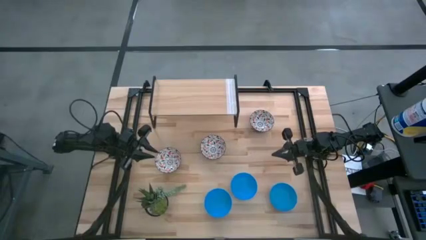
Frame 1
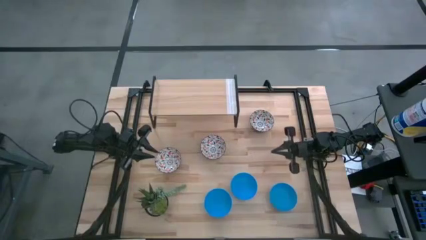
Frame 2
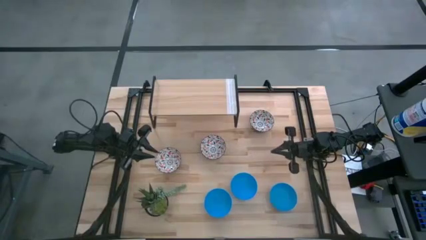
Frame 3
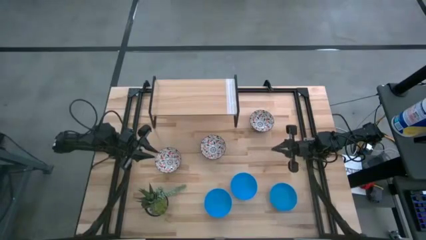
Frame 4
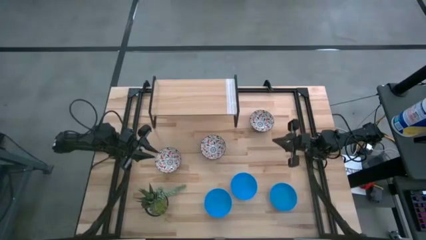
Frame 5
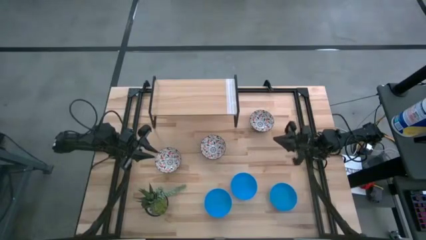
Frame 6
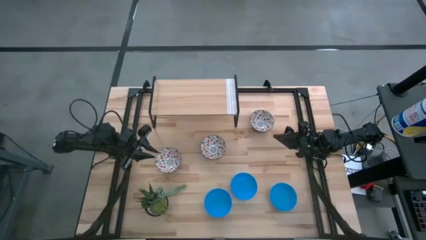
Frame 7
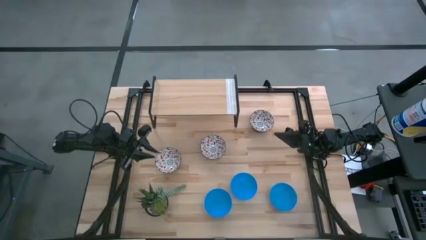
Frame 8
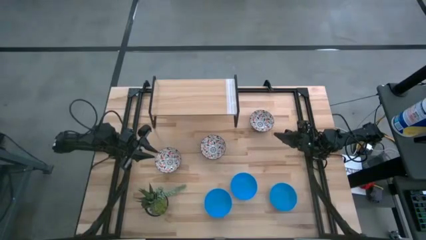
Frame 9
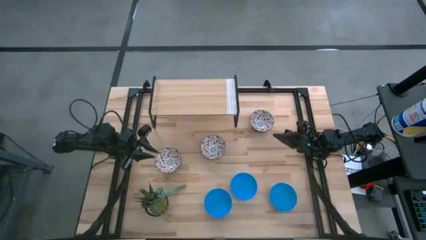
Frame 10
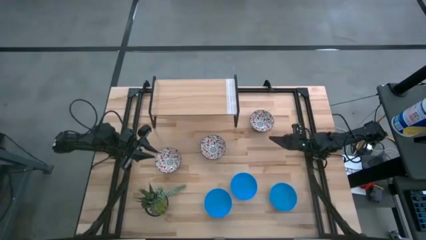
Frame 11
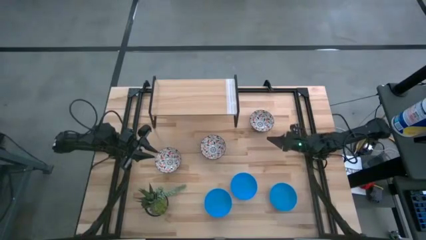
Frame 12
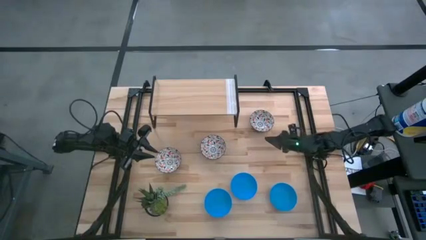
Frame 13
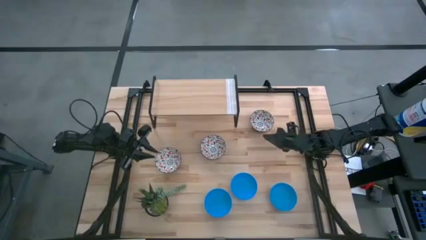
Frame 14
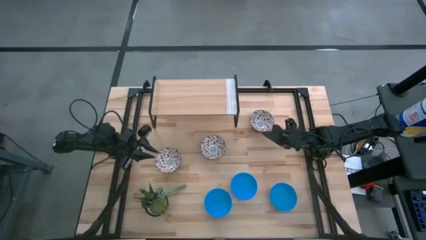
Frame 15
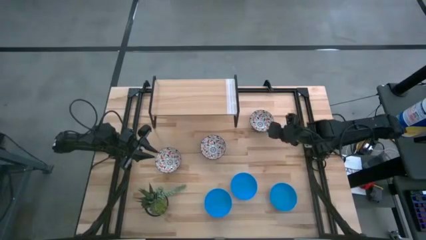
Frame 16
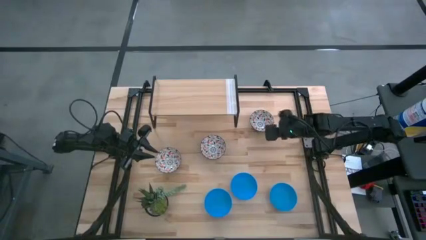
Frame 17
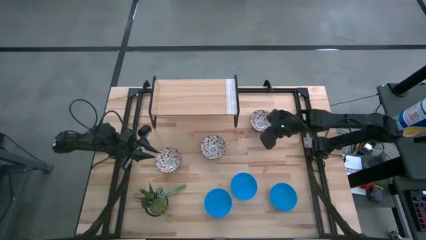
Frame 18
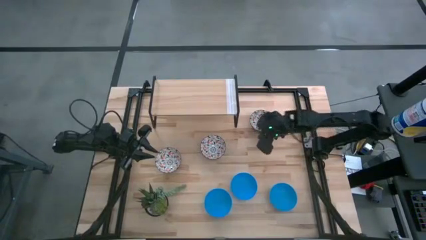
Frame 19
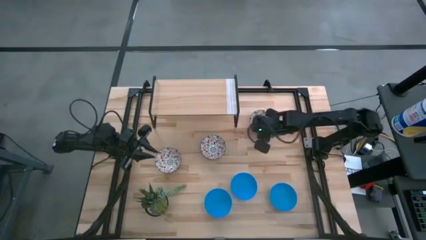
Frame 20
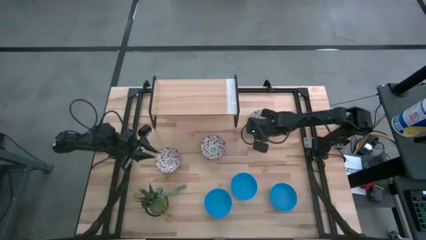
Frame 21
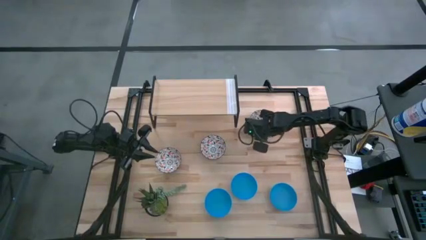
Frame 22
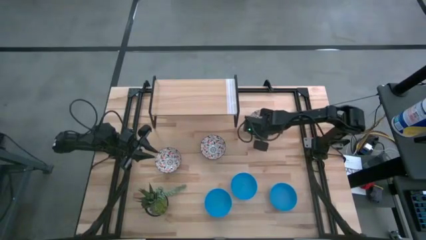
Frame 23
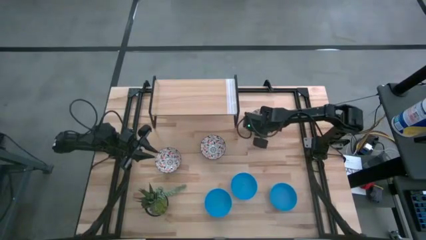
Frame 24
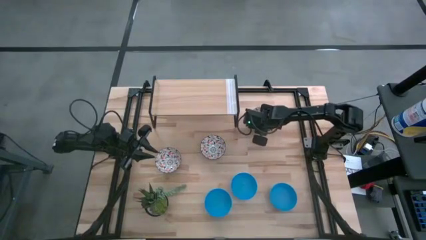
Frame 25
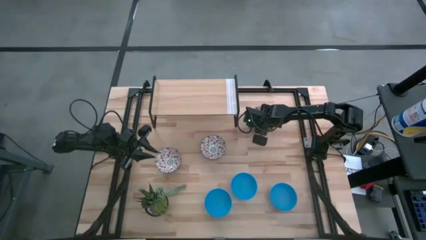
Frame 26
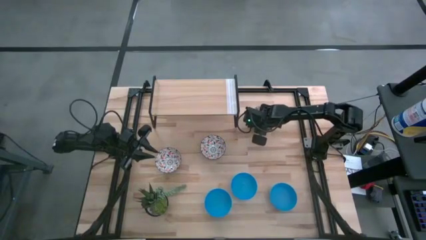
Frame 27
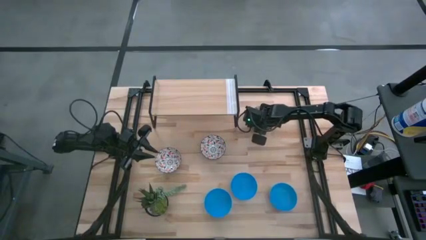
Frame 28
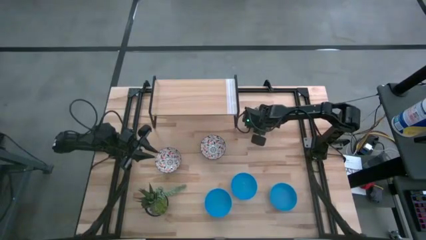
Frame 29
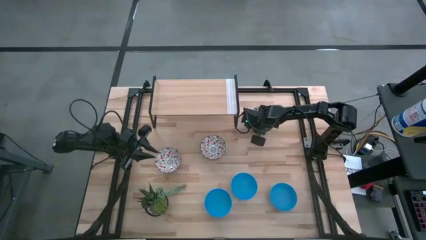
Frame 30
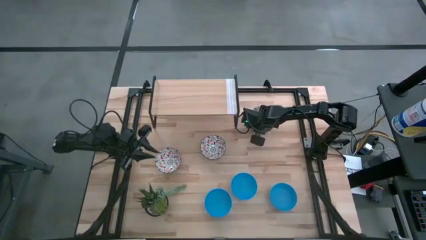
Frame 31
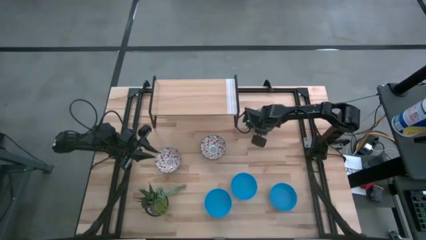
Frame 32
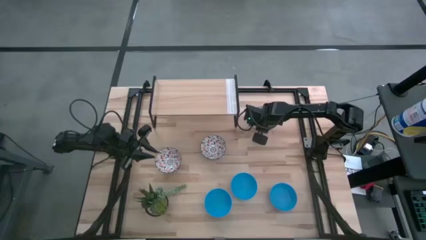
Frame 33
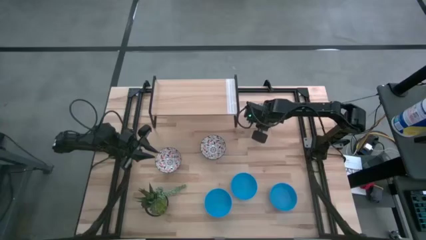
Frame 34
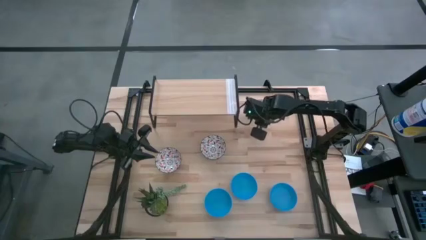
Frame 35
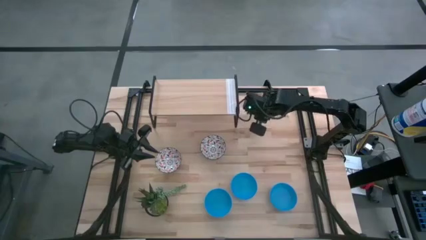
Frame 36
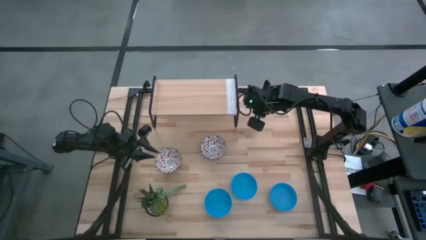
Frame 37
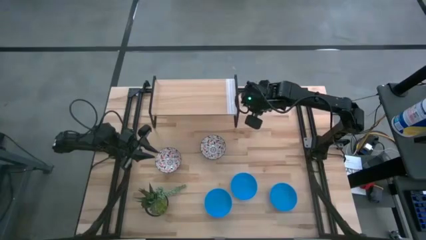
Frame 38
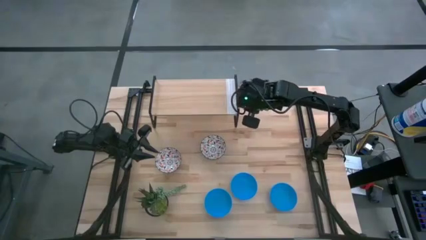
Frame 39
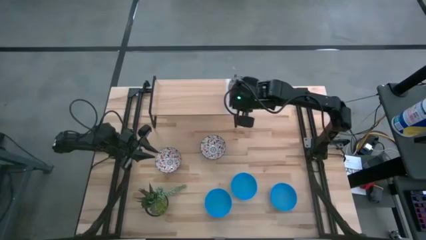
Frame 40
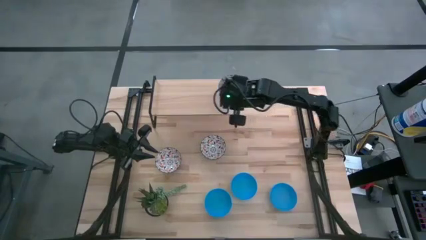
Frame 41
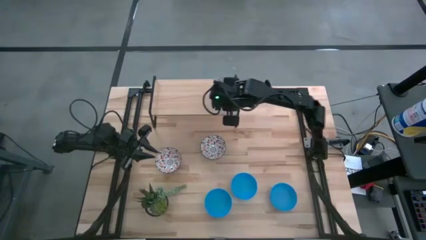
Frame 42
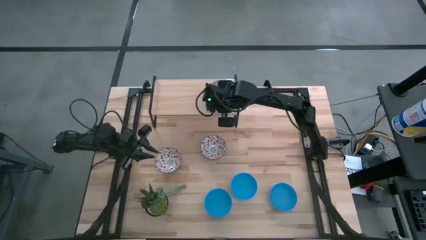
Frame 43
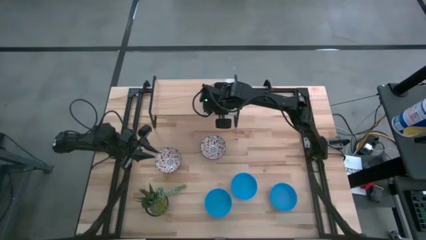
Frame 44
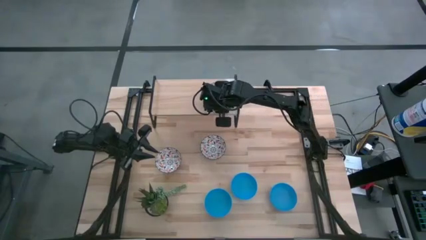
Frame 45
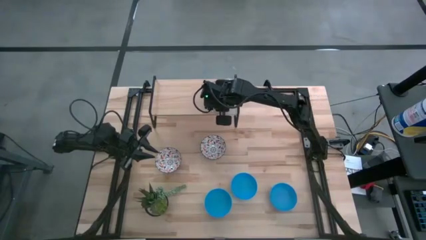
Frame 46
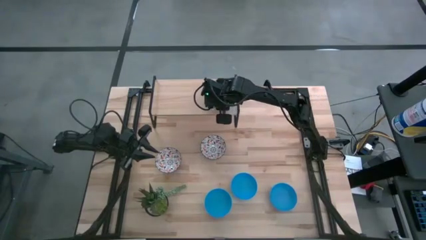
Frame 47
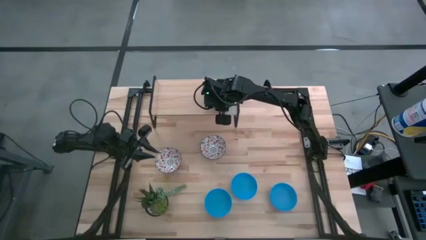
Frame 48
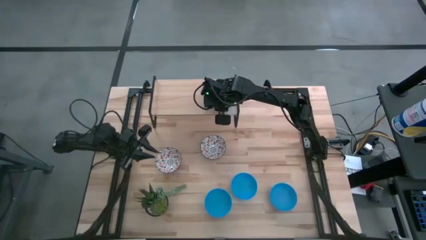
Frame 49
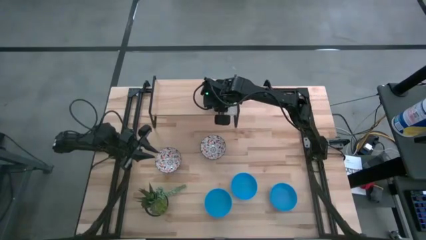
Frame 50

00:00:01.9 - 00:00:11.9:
Task: Pick & Place Mini bowls
Put the white patterned bowl on the shelf
